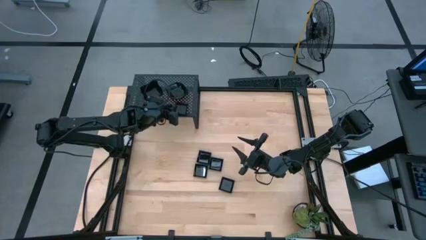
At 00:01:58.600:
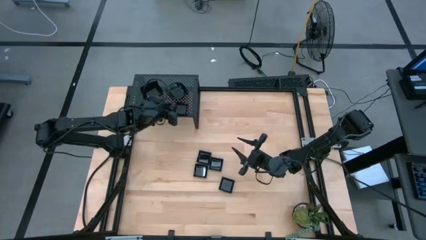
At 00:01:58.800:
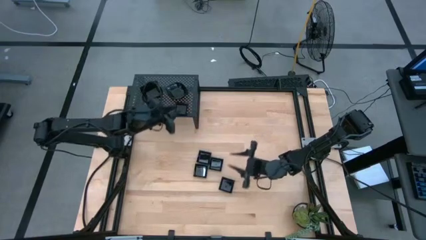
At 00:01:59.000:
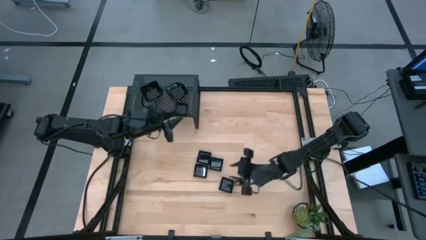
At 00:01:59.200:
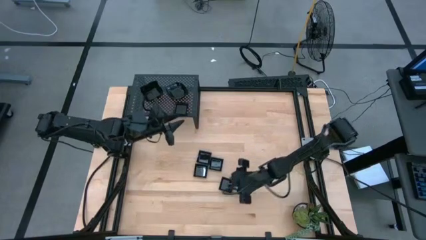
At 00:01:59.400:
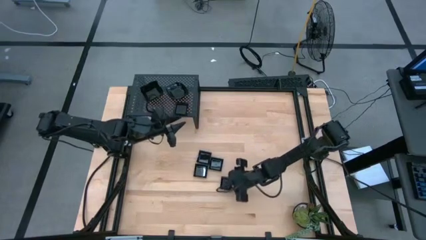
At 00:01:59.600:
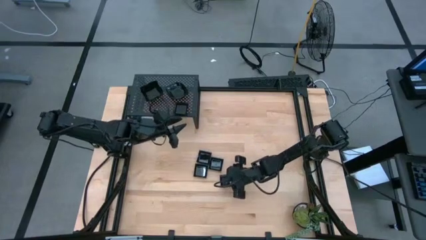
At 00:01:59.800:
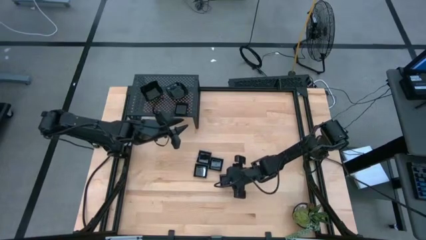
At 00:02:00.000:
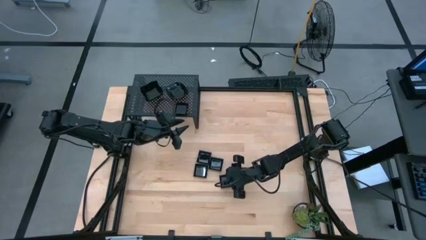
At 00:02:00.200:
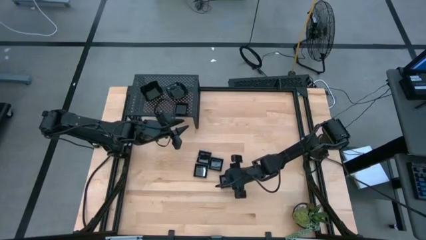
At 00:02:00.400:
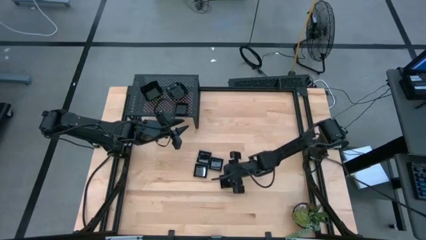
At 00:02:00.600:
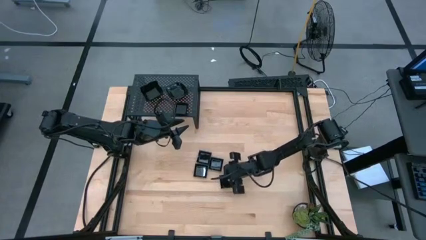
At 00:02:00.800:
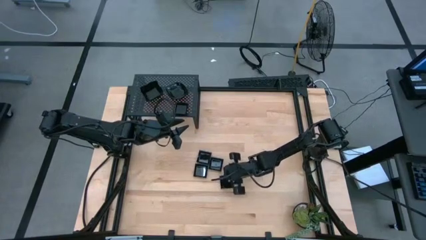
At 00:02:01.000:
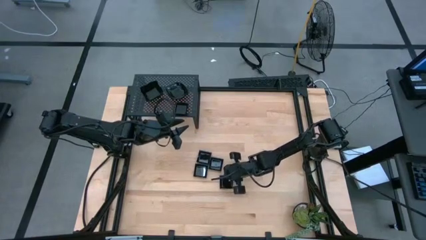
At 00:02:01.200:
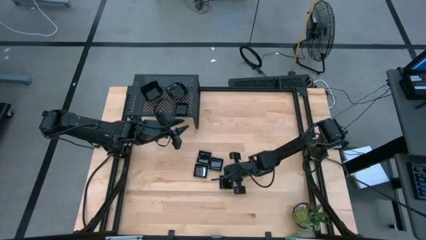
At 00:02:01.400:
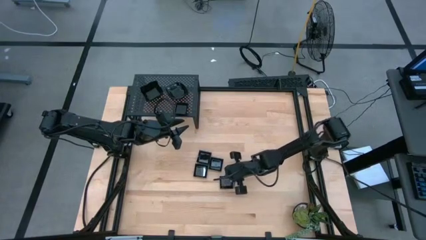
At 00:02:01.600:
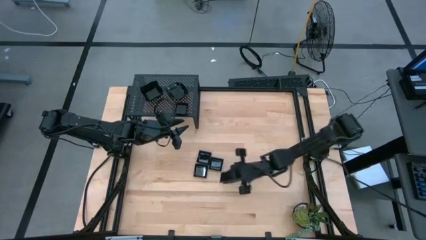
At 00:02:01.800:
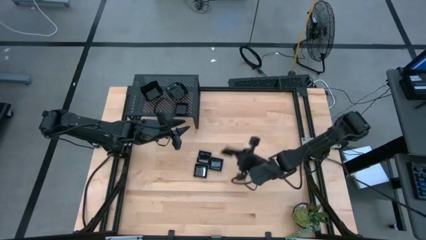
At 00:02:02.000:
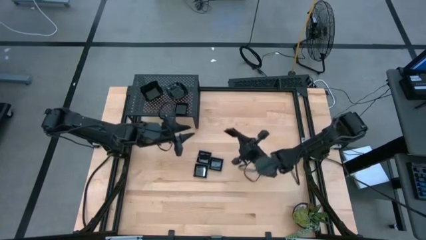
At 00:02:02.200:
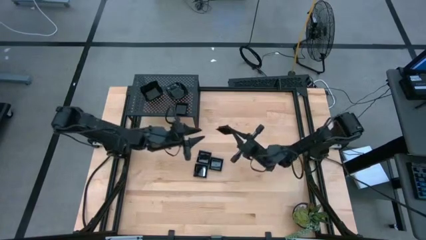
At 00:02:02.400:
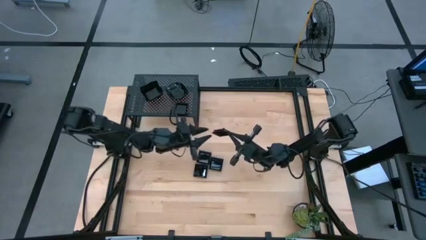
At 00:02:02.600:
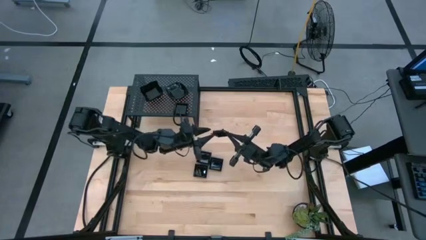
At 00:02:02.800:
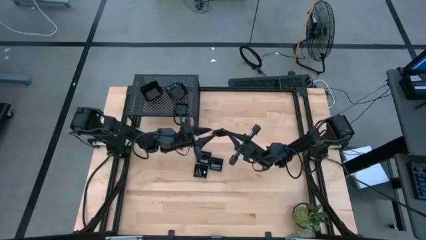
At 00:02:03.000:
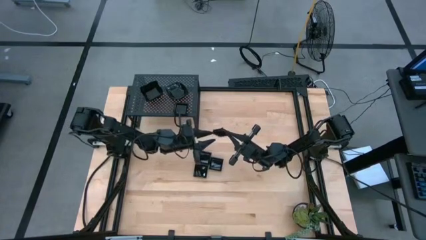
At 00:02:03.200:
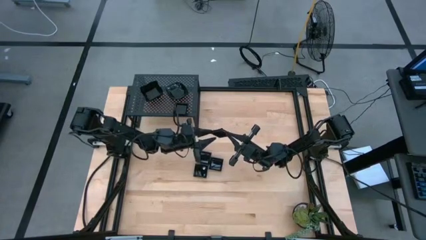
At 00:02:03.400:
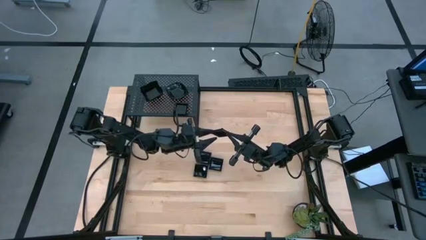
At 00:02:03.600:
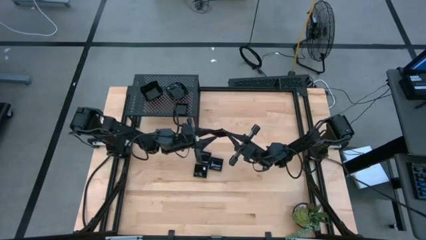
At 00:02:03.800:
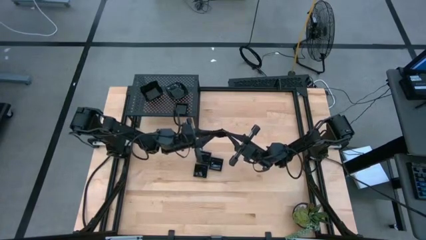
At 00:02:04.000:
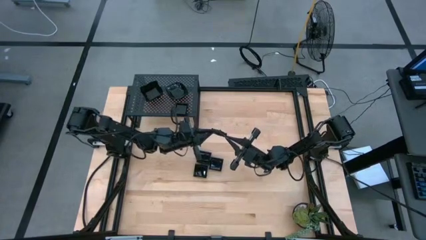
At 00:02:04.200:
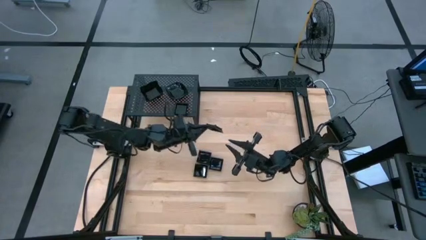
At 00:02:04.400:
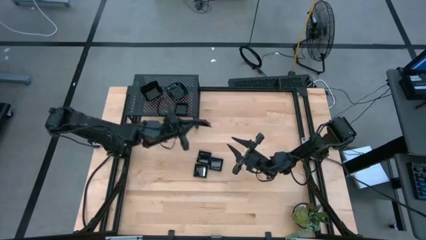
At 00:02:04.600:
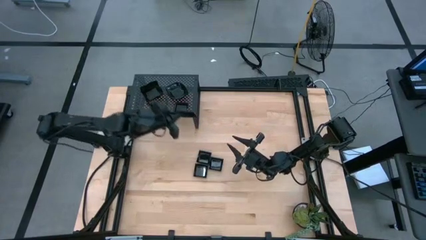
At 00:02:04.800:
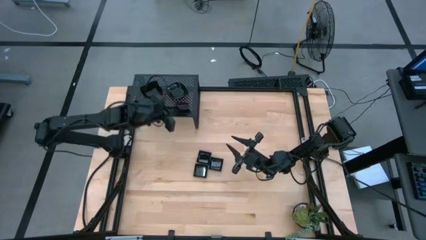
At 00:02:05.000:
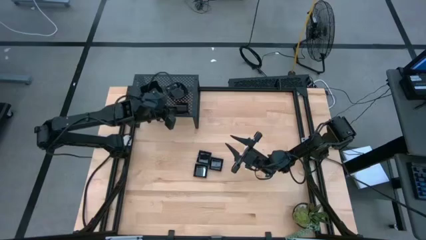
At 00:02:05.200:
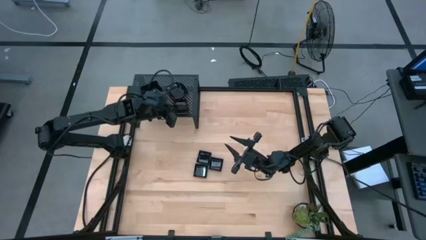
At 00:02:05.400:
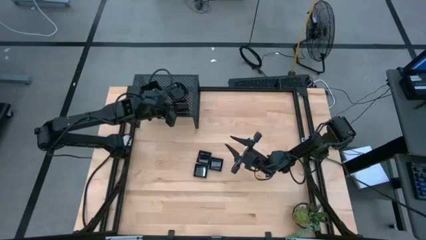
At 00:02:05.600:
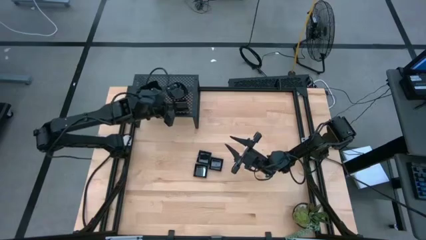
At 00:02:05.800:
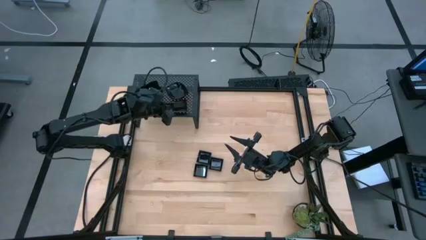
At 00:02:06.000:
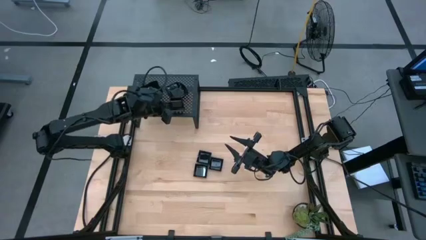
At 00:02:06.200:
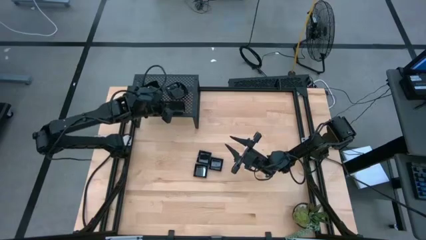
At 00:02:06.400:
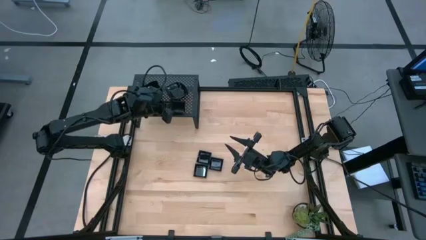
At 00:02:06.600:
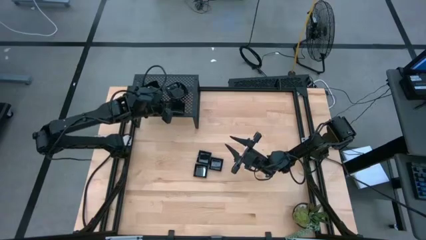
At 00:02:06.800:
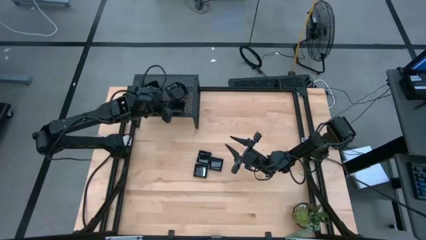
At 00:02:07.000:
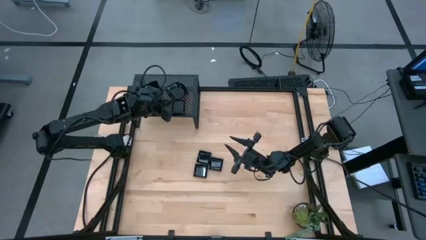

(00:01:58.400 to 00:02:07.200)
Task: Pick & Place Mini shaped plates
Stack the square plate on top of the square plate on the shelf

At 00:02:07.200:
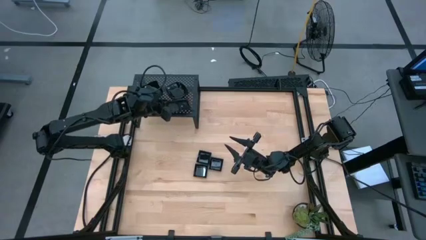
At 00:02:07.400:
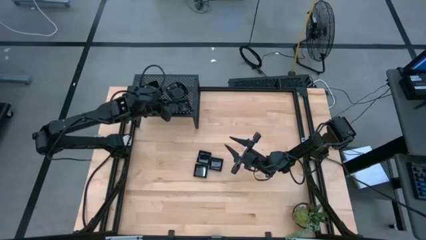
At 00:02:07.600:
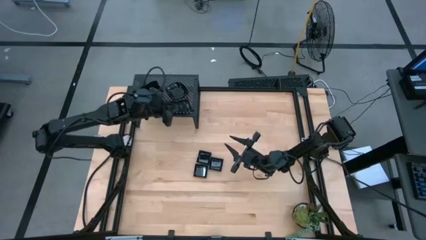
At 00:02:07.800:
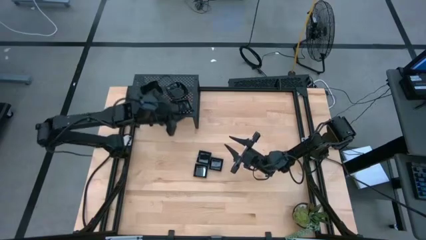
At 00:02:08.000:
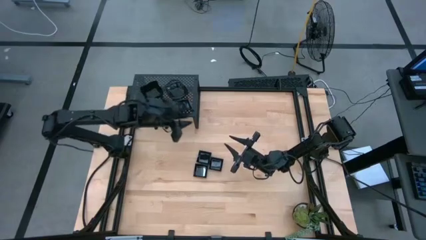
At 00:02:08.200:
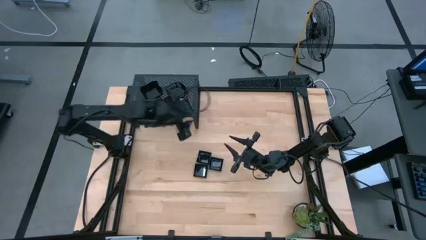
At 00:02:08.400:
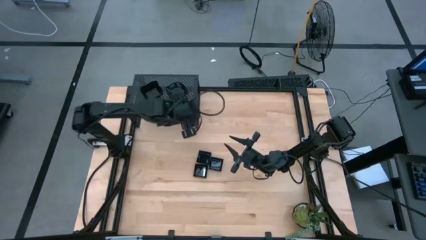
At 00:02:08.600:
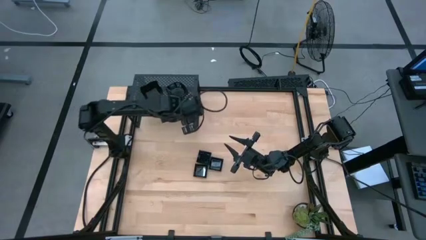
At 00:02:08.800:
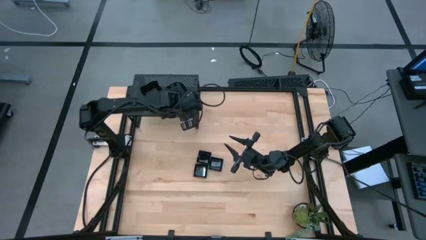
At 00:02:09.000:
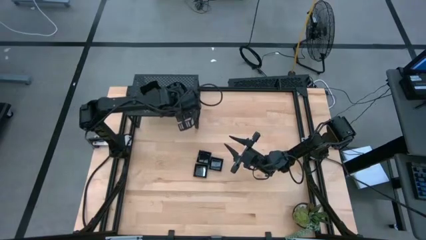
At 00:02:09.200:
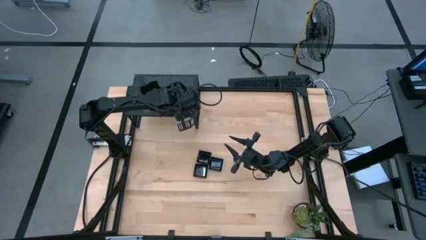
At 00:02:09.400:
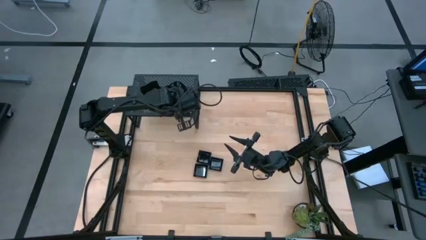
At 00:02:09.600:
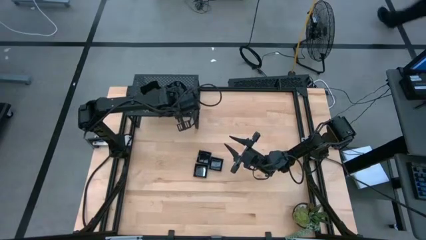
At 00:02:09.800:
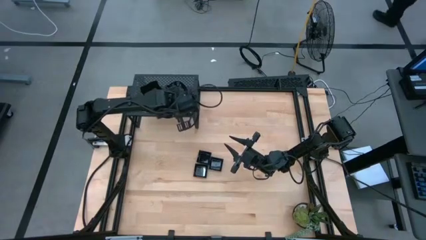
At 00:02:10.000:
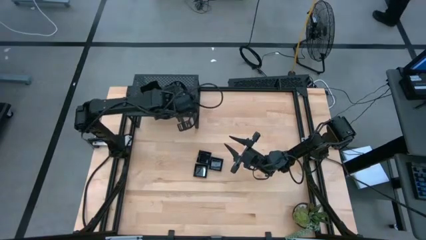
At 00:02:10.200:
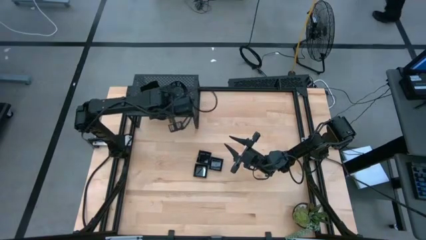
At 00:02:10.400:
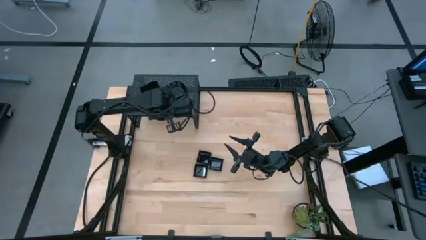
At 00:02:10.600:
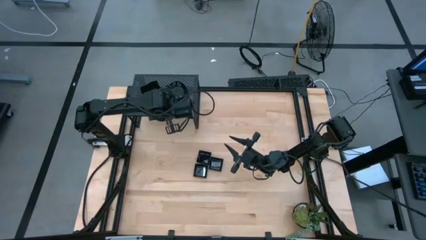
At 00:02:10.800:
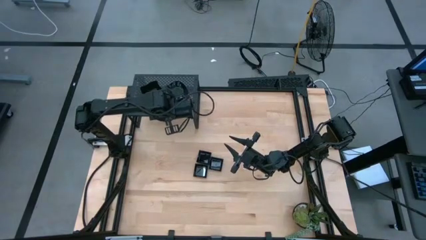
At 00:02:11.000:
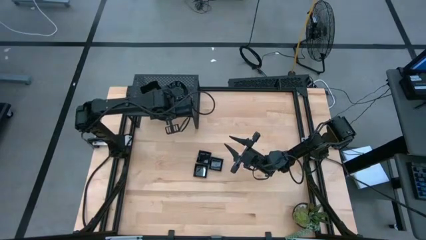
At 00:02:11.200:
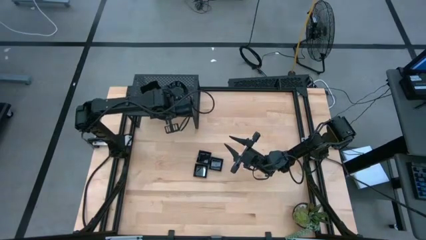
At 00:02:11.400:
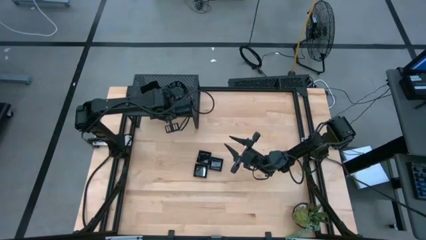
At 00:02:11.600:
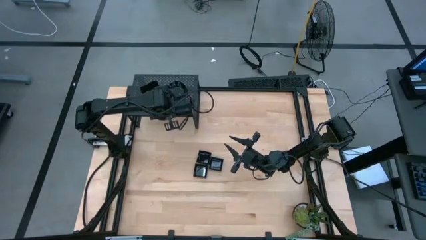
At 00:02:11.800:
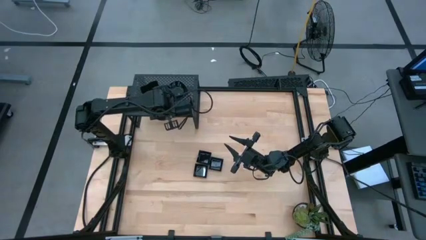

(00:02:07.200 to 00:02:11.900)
Stack the square plate on top of the square plate on the shelf
